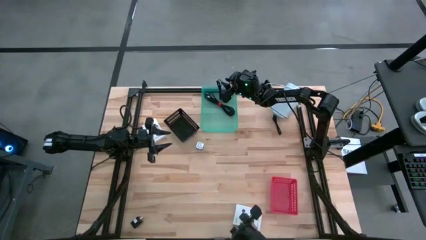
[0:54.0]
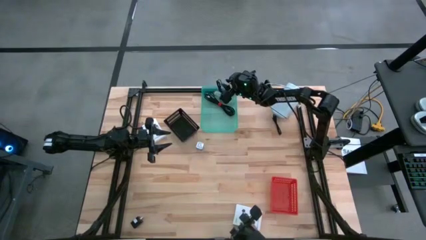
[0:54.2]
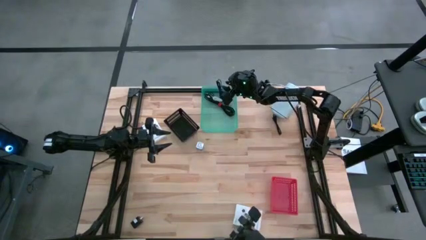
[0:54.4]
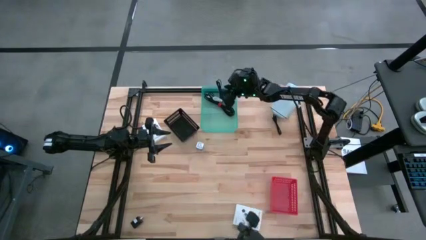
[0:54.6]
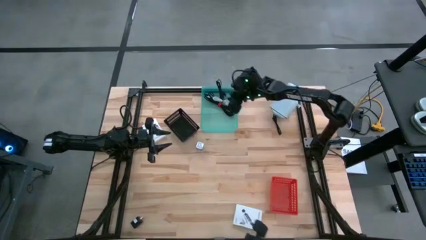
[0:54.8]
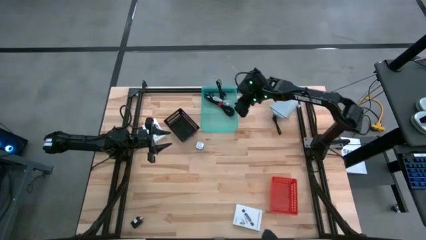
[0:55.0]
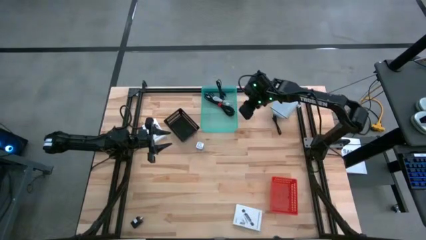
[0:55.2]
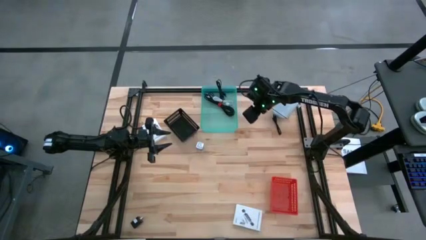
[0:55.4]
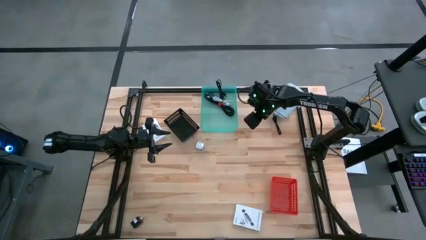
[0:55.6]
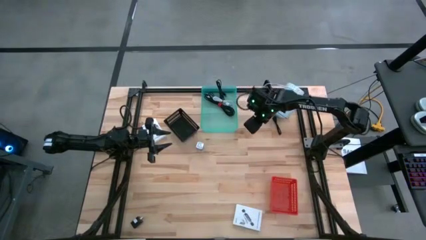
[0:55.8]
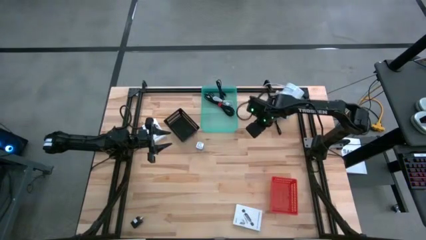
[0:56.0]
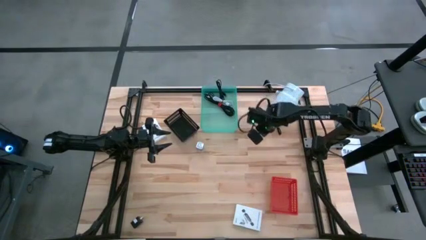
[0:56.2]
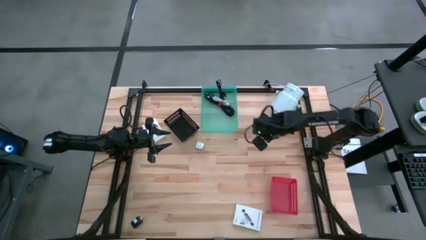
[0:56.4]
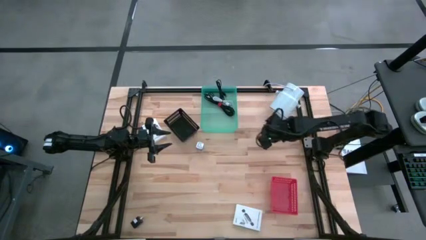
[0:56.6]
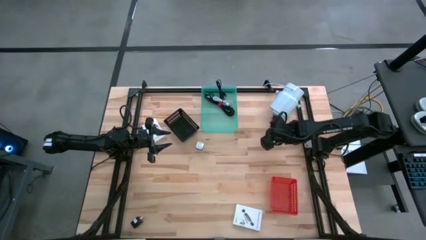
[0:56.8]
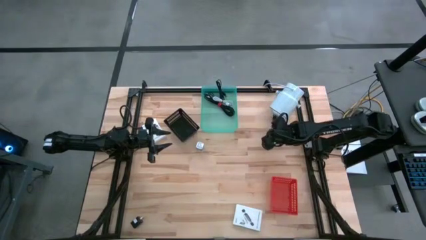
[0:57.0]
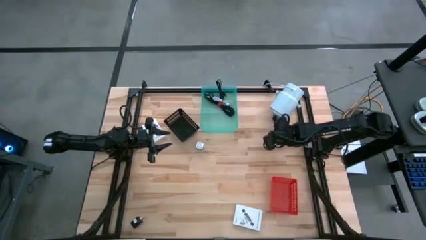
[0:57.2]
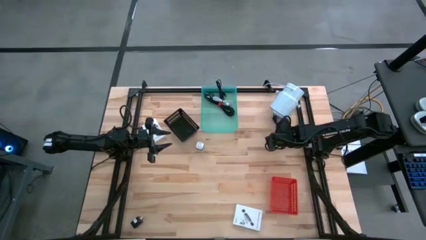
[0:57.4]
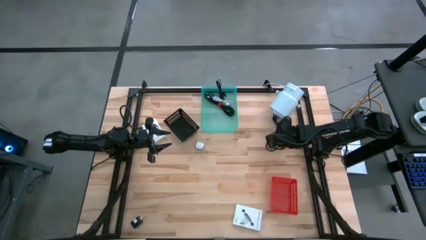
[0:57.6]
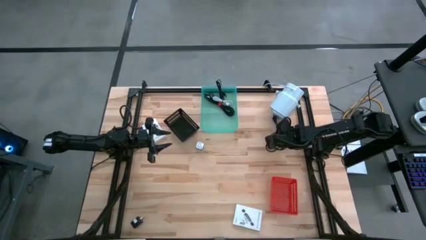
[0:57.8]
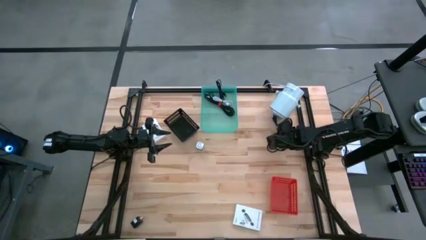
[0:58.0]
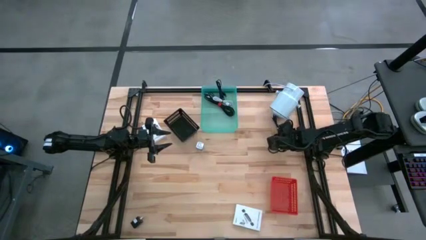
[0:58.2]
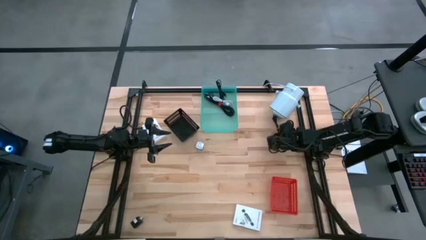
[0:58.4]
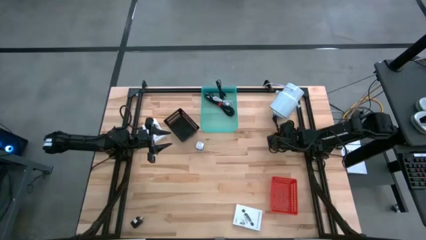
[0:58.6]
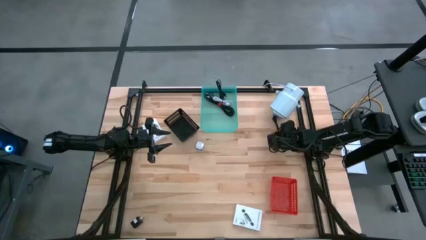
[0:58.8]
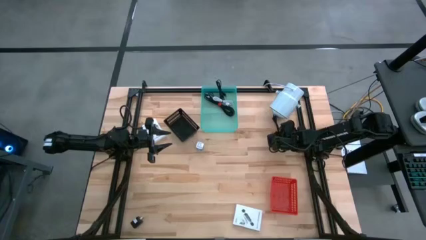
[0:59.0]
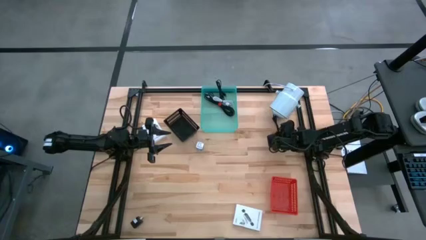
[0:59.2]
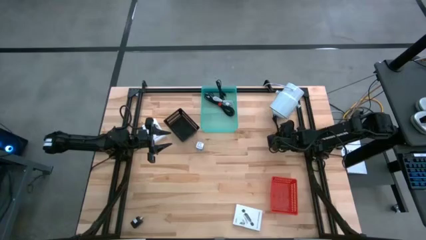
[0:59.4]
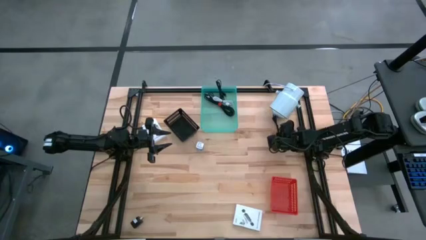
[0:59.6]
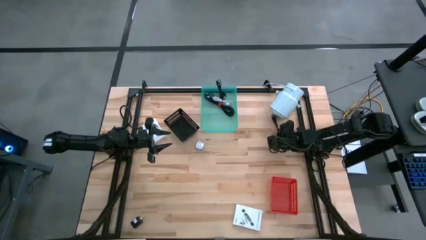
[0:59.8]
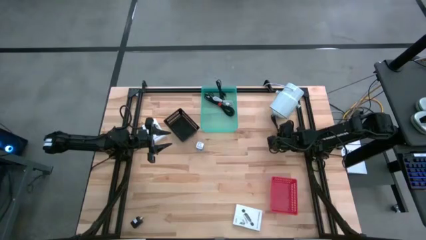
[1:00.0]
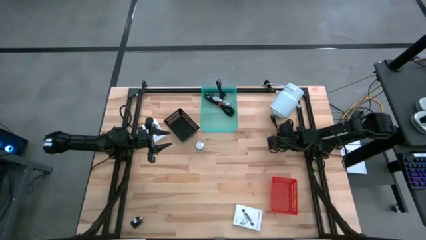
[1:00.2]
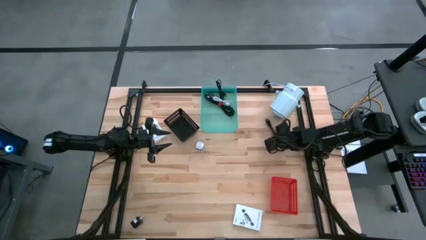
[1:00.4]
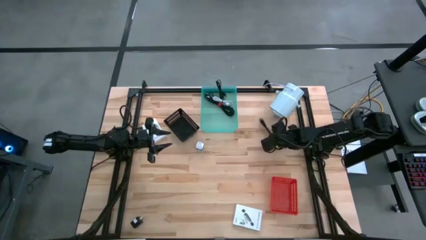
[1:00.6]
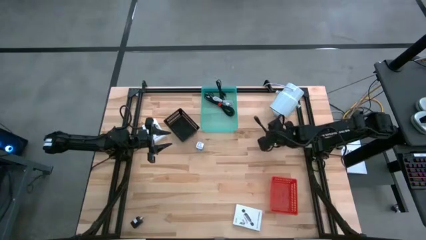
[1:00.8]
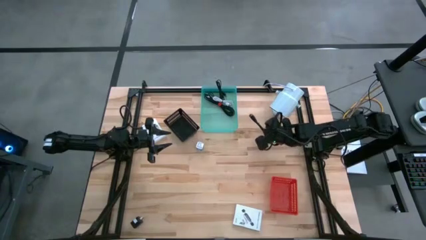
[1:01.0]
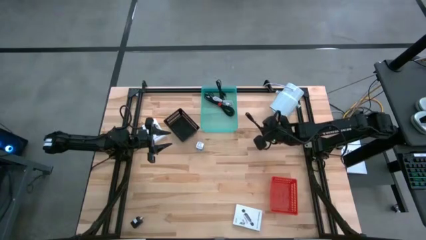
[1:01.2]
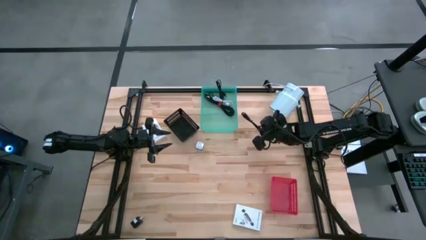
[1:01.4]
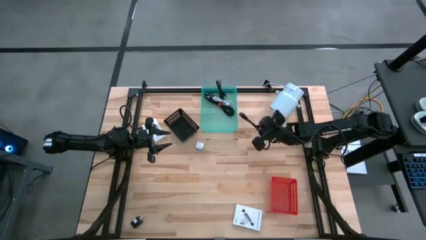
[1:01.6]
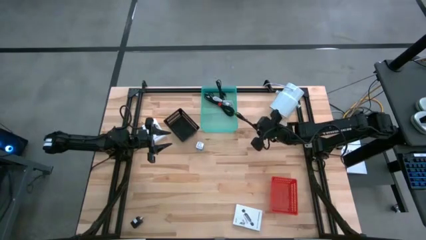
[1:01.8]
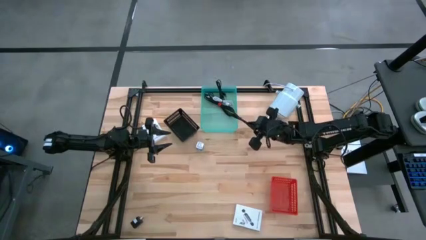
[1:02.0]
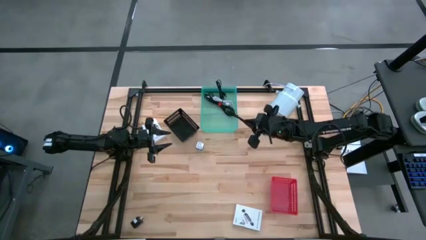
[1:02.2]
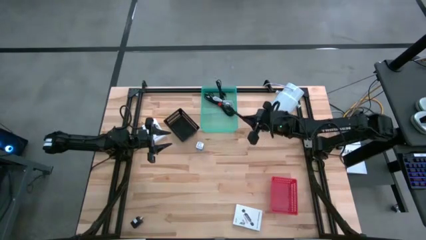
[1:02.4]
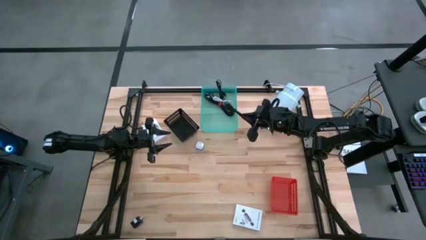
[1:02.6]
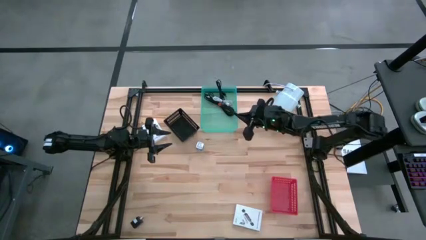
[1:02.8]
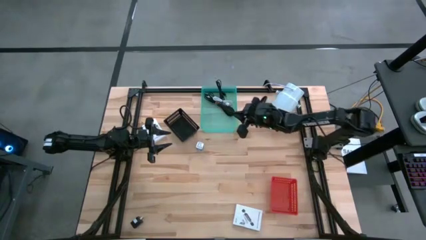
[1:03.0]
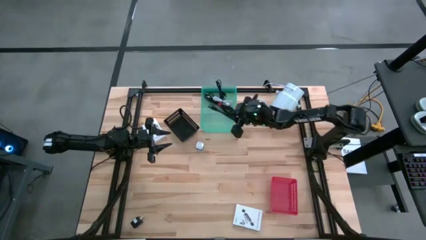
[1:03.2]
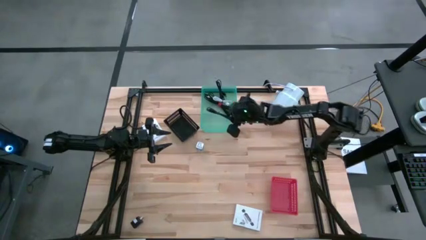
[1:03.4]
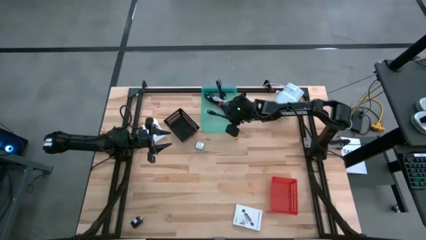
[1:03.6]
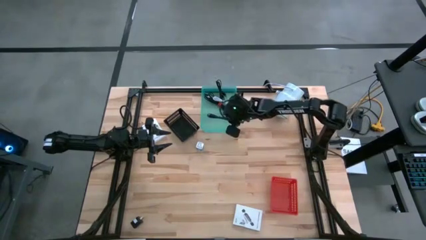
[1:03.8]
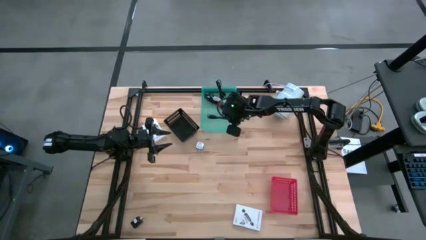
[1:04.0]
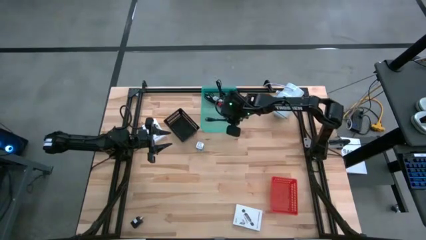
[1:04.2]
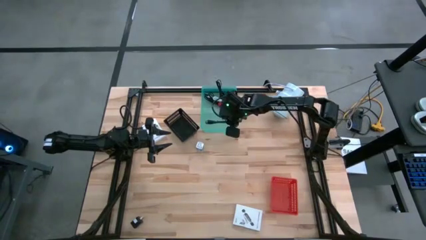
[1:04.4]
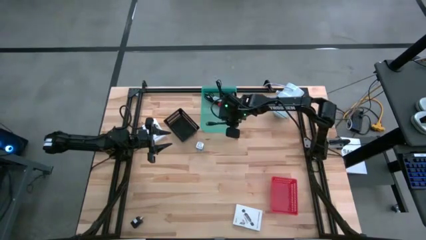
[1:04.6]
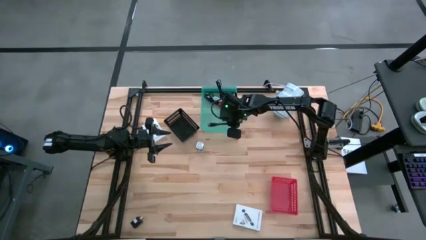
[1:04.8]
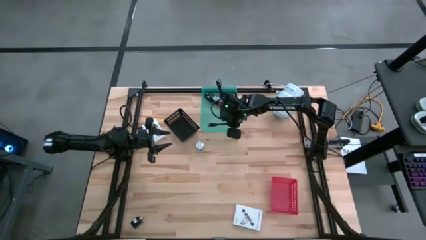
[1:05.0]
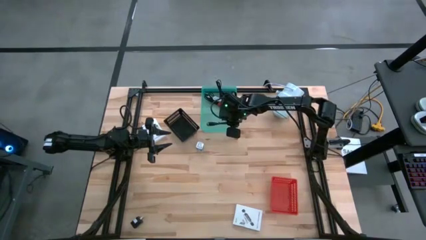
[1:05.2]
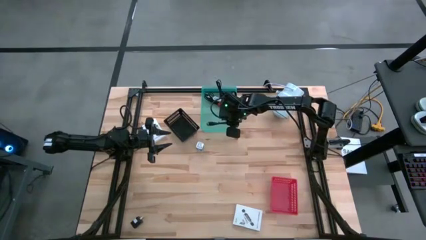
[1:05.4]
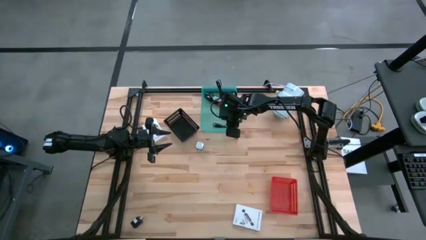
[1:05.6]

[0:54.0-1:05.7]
Task: Pick and place items into bin
Put the black charger cable into the green bin
